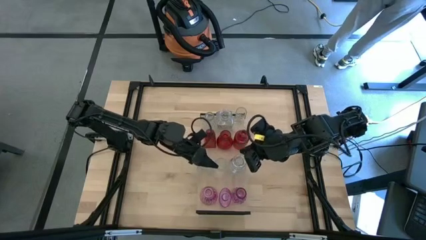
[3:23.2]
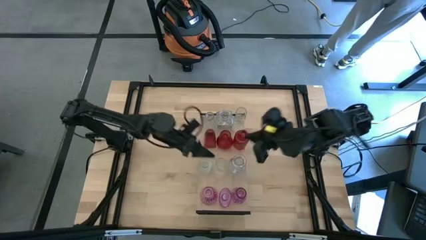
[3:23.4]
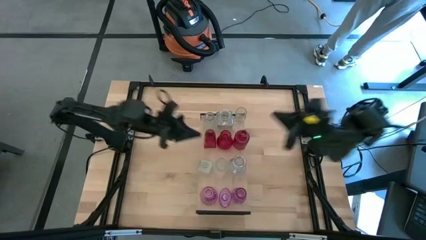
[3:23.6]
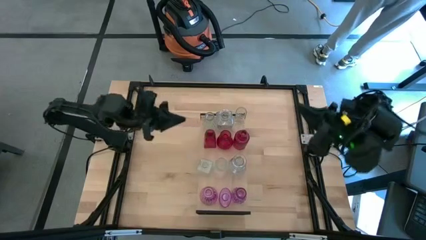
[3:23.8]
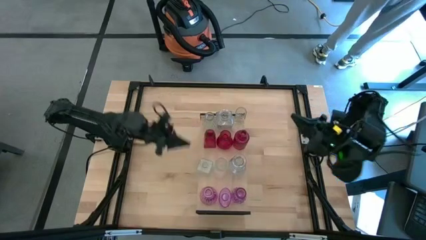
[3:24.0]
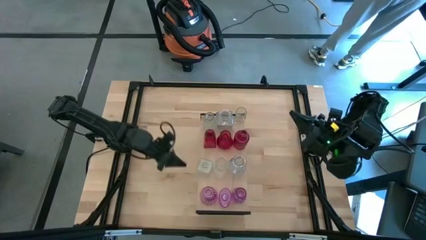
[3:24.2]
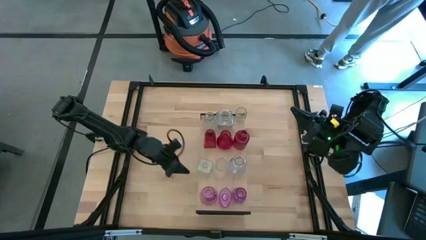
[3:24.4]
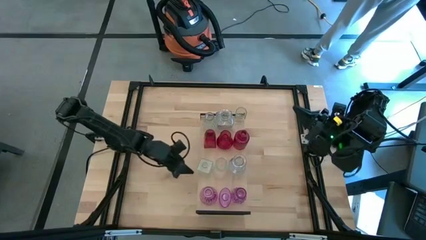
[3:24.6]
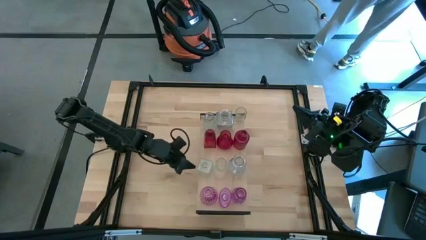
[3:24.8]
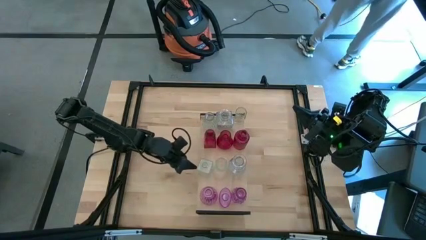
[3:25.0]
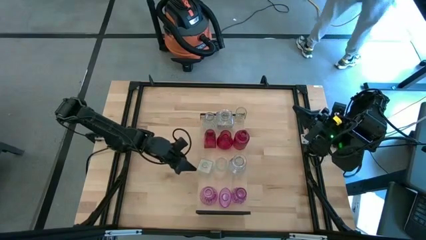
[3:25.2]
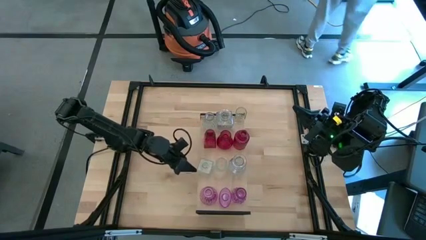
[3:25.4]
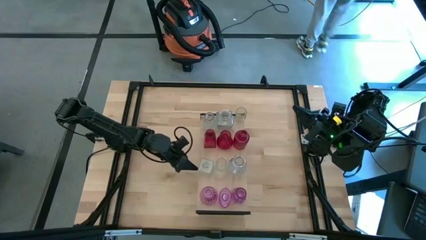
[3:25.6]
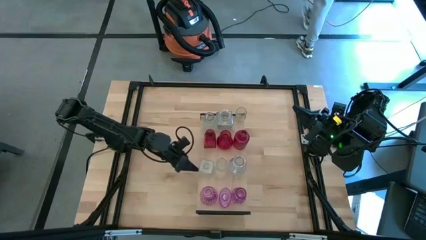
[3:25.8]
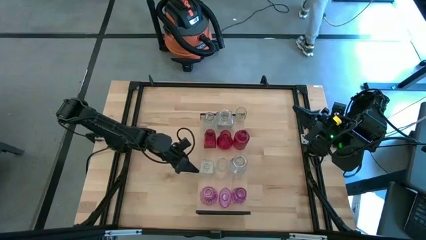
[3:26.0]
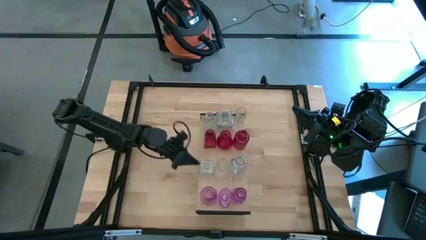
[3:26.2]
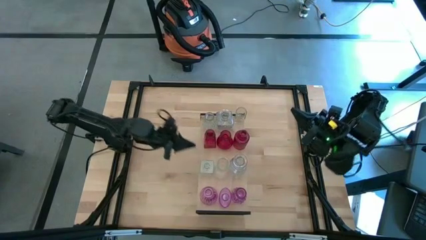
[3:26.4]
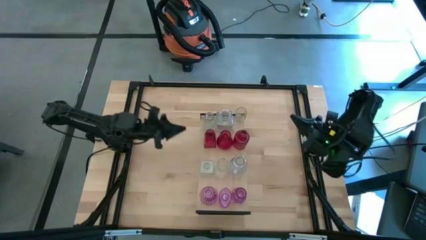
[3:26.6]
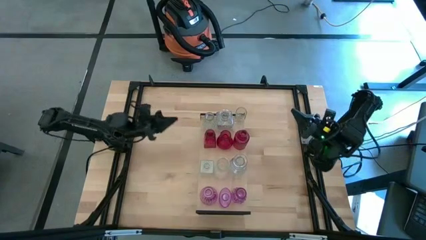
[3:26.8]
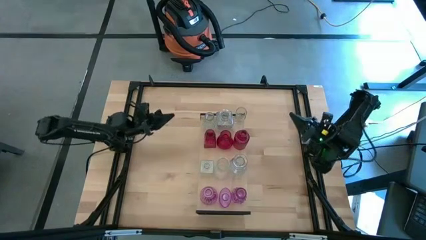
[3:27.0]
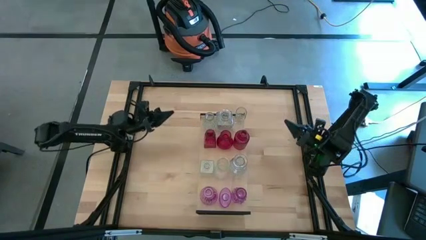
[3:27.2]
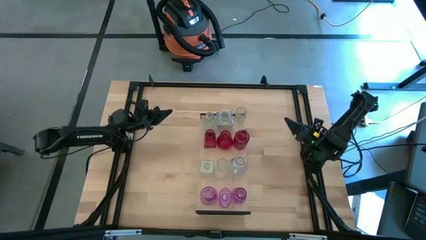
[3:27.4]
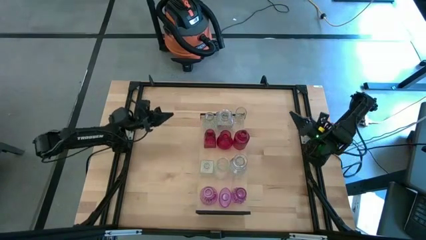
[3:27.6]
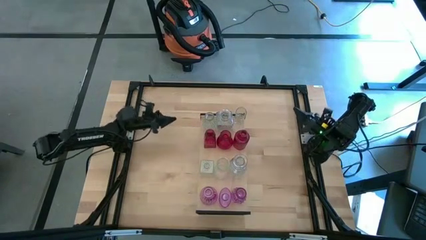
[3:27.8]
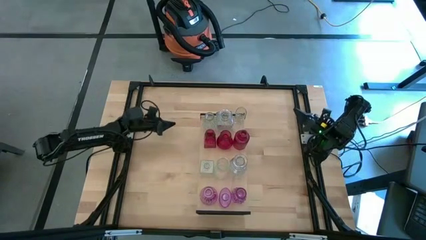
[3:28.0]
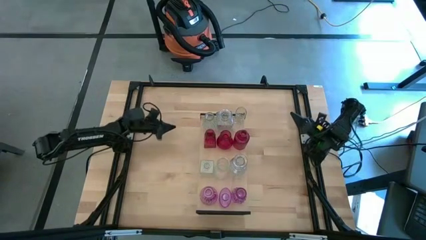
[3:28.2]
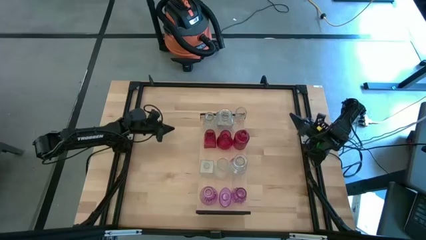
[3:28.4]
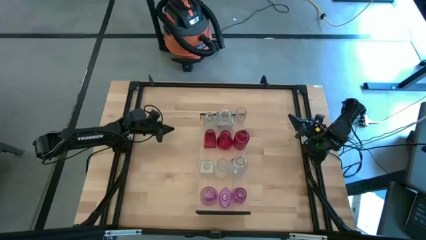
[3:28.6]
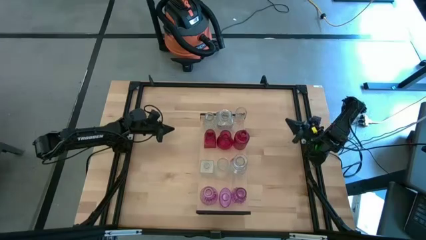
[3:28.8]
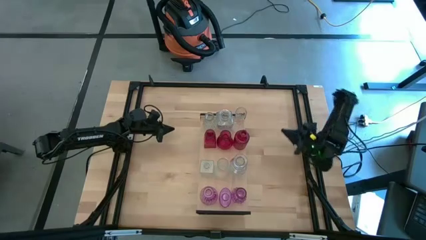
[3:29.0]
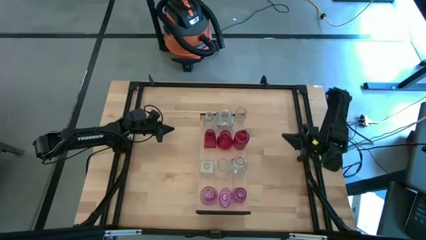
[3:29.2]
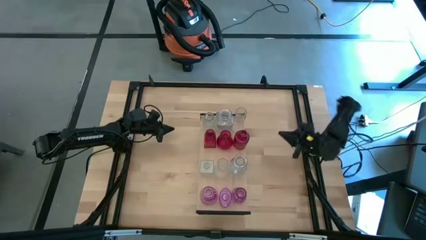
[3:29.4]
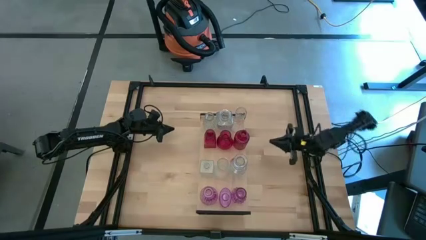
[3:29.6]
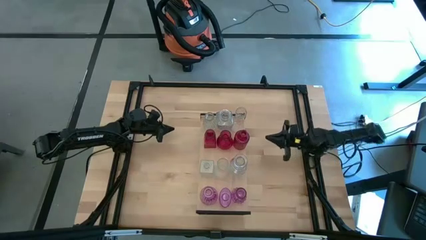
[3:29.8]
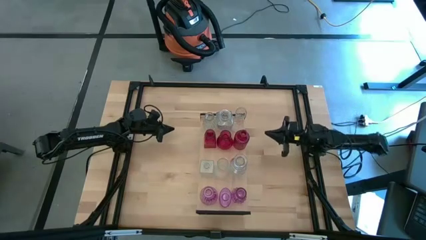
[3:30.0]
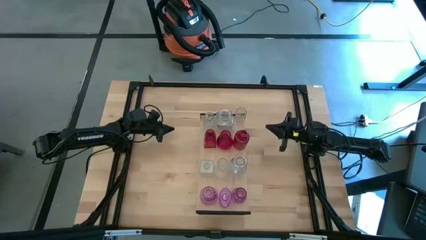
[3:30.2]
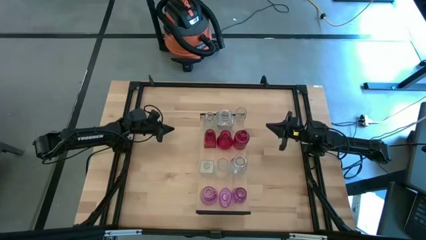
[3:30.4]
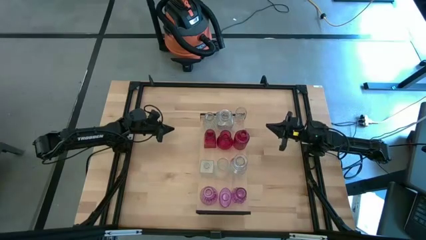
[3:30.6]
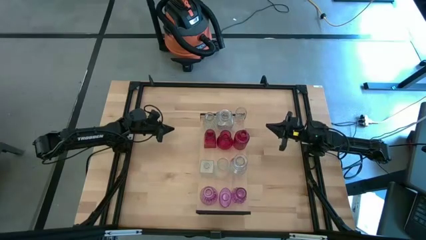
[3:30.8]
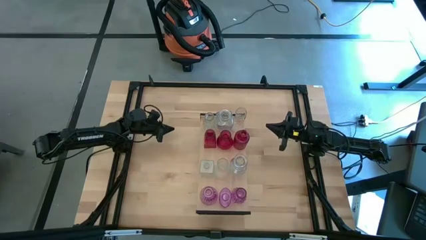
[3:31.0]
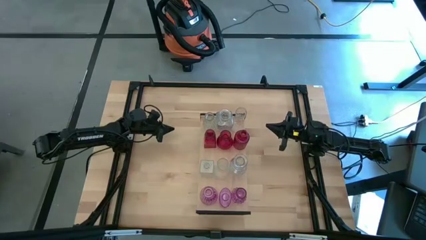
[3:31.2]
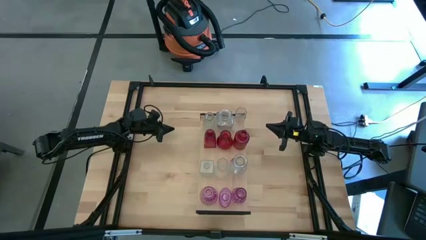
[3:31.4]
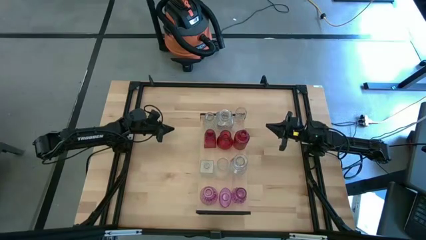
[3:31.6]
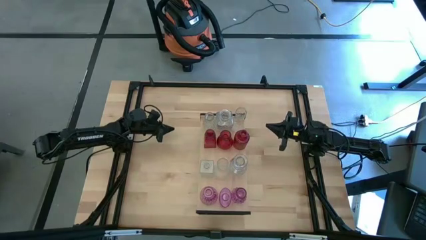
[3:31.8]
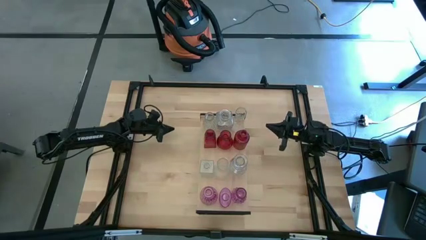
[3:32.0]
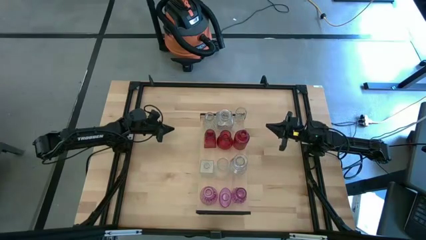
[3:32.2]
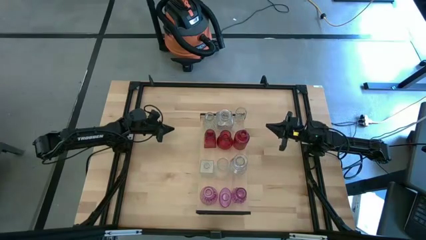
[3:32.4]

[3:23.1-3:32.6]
Task: sort vases onto shelf
Return to Home Position

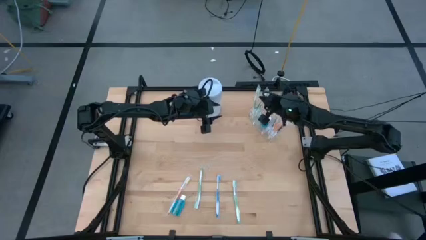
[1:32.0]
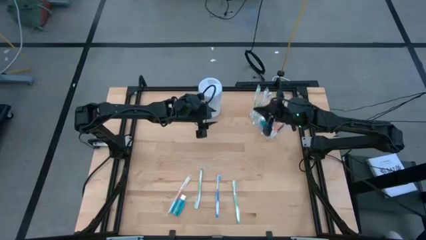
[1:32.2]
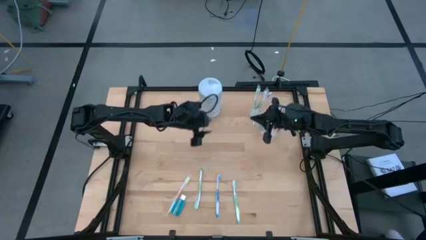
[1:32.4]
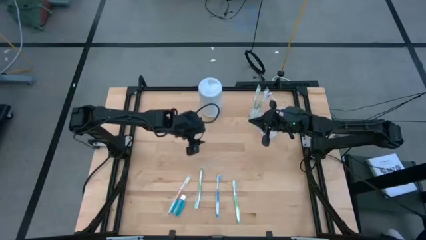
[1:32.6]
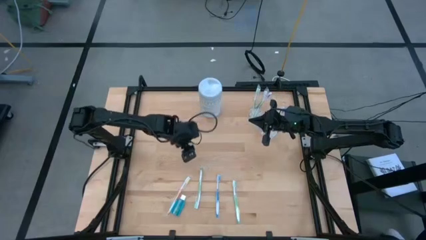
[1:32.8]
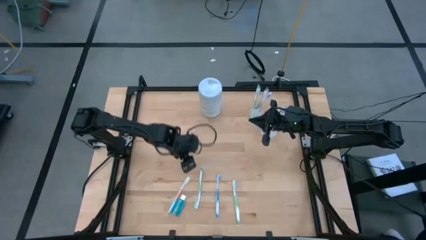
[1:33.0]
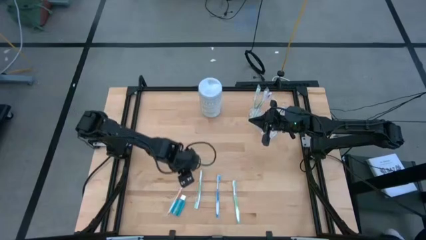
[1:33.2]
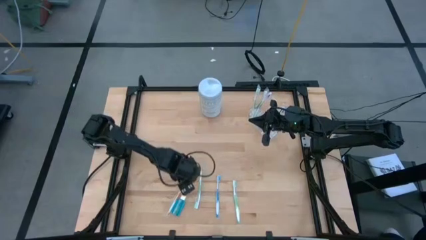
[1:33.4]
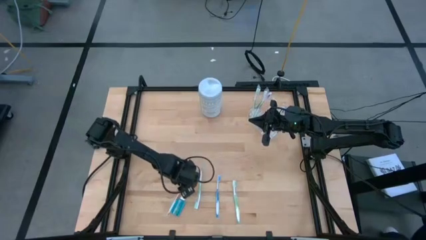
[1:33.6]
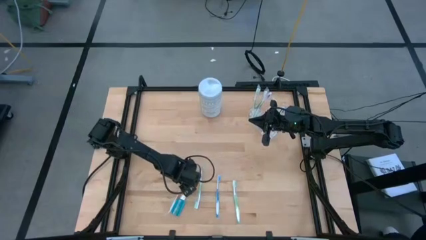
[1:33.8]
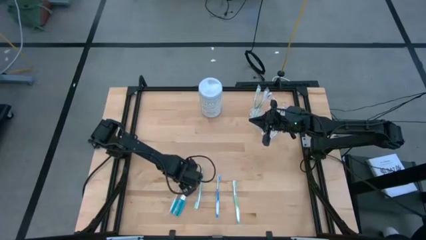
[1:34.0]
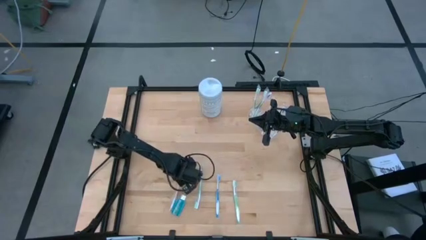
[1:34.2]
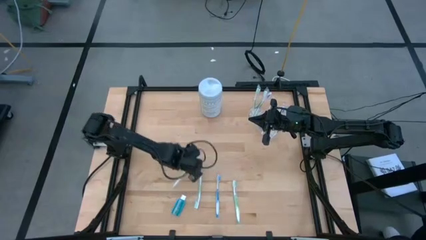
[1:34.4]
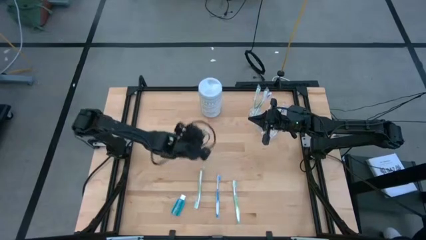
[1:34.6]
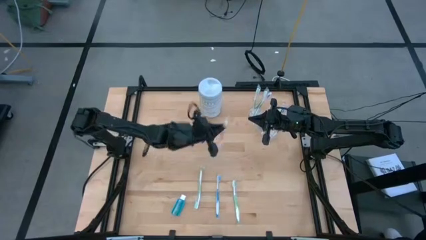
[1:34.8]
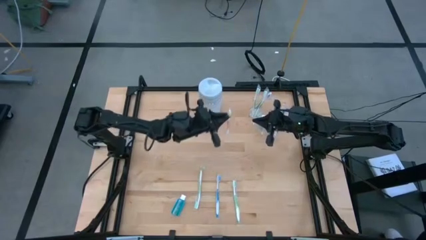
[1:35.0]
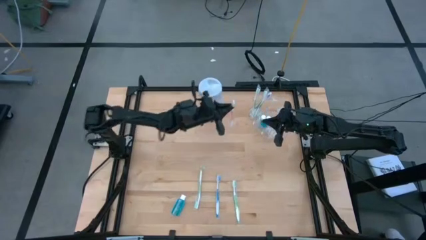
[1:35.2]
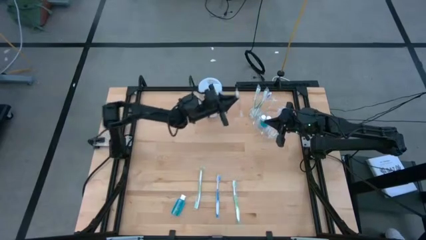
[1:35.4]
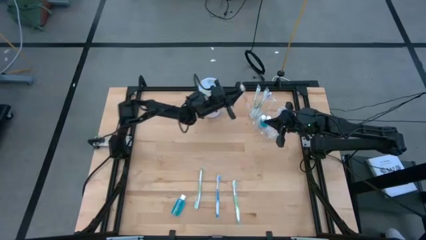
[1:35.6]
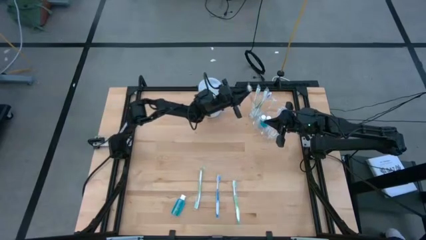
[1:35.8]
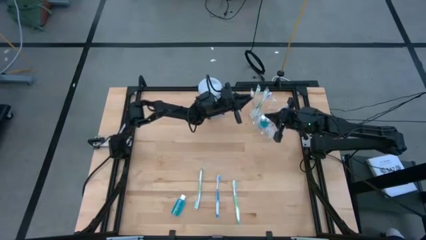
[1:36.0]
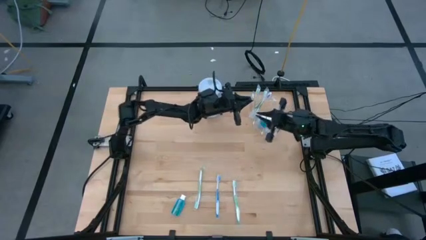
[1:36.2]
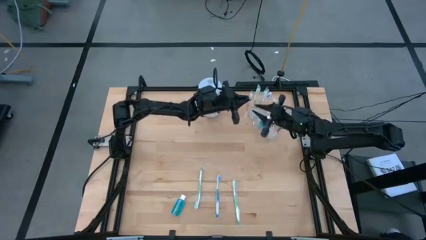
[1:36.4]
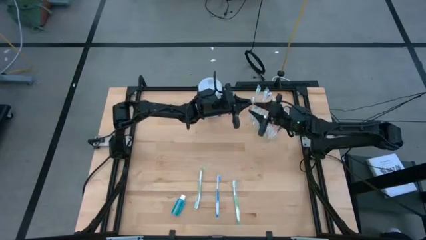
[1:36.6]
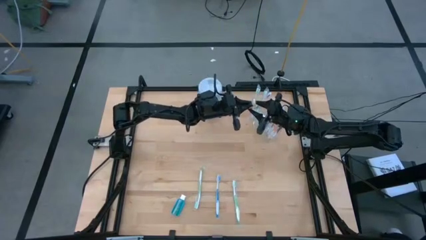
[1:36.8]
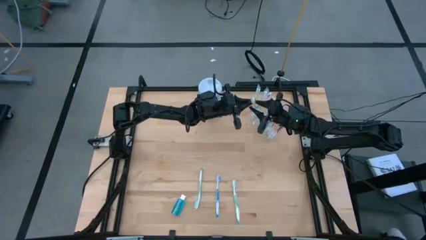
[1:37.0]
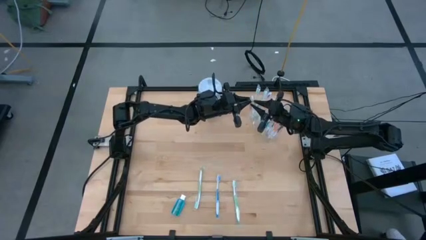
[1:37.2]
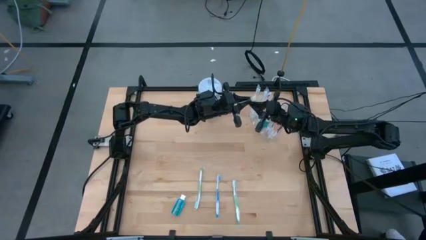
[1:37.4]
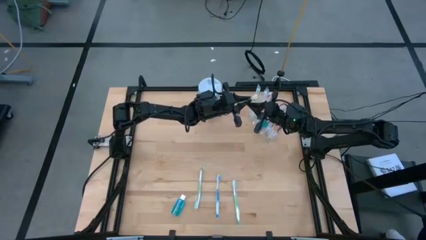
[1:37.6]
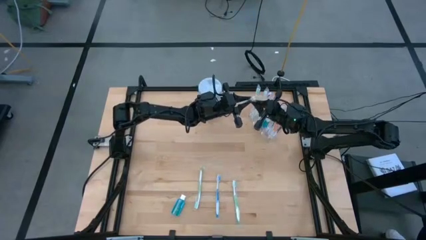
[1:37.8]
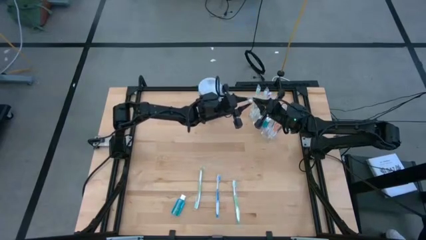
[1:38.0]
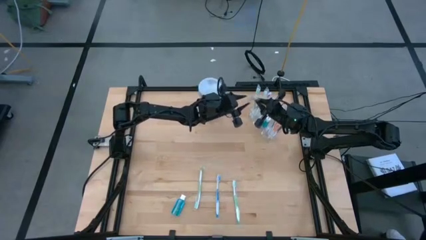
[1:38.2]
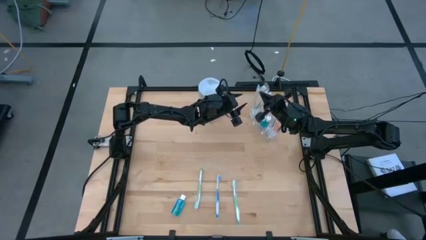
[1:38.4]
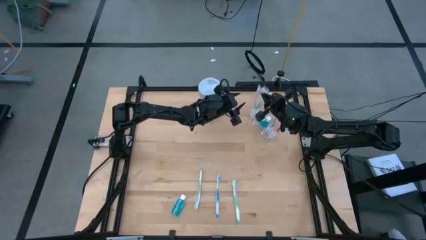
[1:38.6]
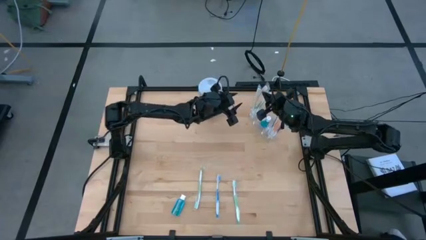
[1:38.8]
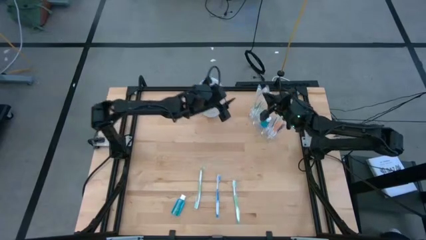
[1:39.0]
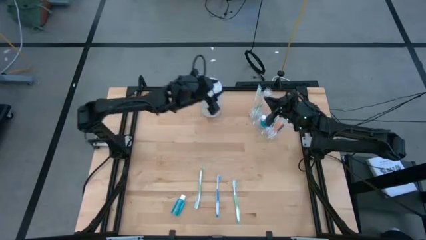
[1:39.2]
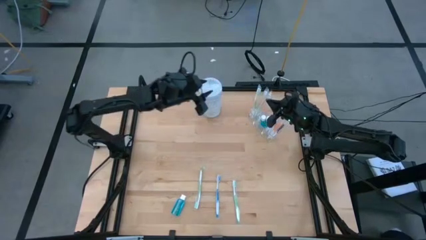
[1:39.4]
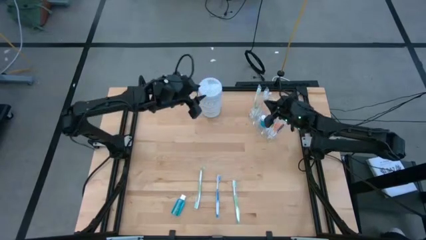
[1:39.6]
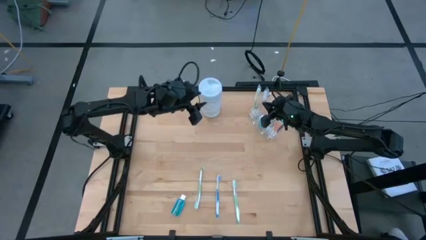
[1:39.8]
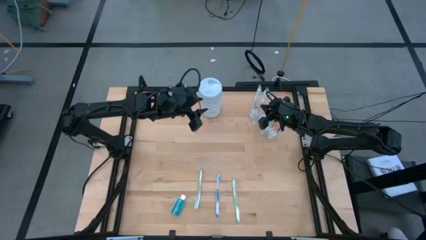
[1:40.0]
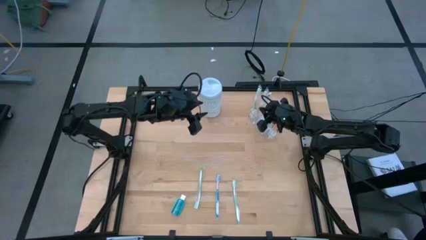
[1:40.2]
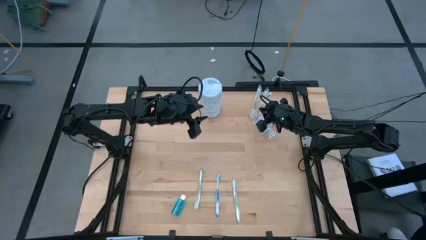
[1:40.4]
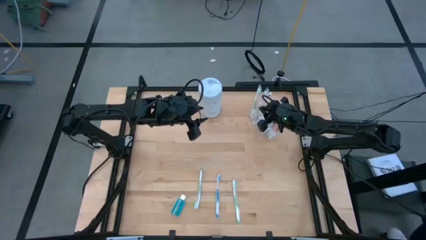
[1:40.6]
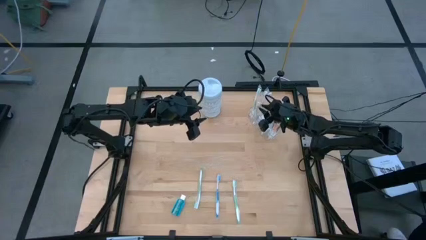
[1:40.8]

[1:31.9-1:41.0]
Task: Pick & Place toothbrushing station
Put the orange toothbrush into the transparent organizer
